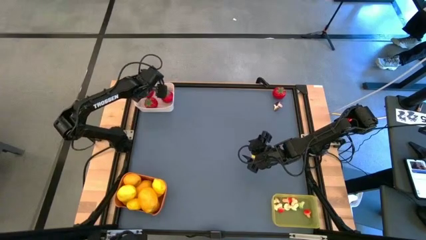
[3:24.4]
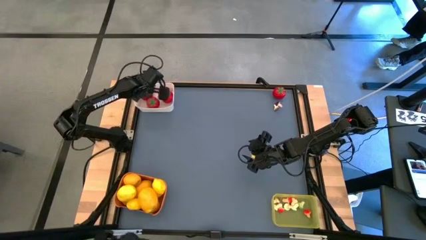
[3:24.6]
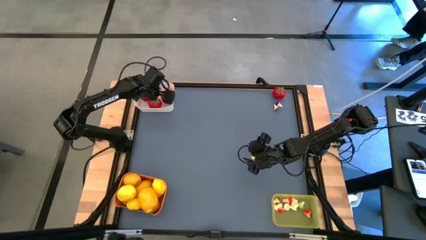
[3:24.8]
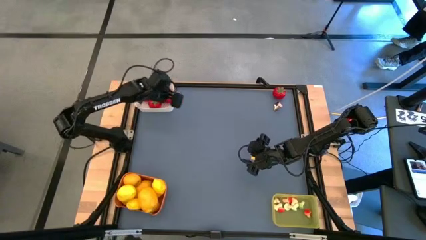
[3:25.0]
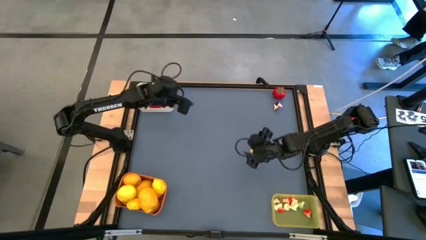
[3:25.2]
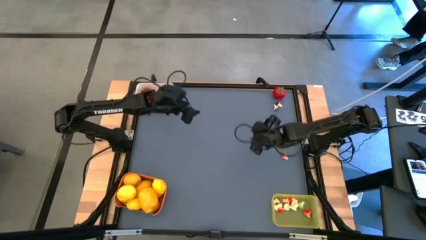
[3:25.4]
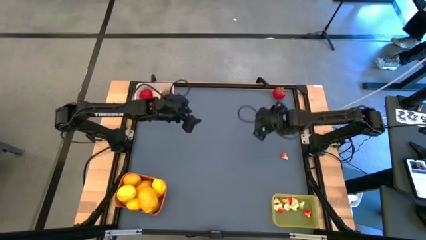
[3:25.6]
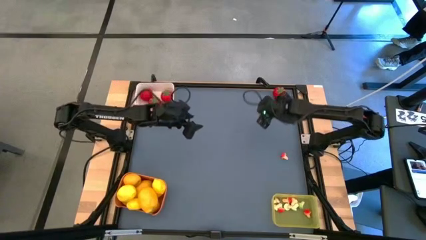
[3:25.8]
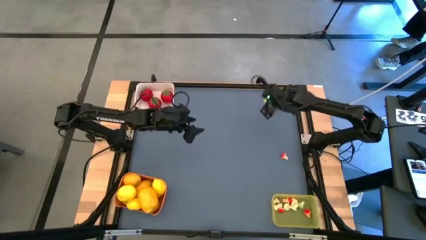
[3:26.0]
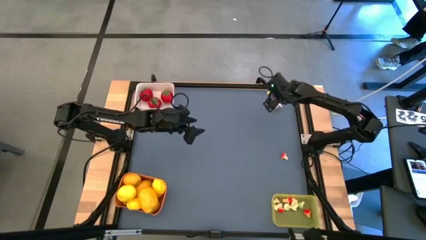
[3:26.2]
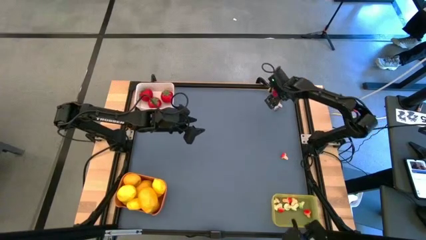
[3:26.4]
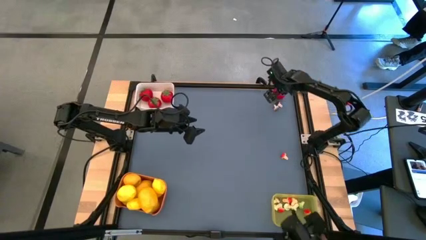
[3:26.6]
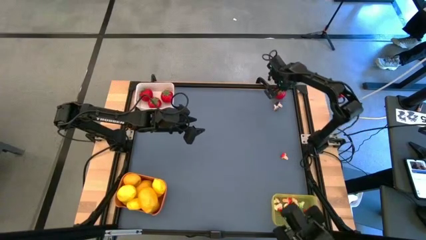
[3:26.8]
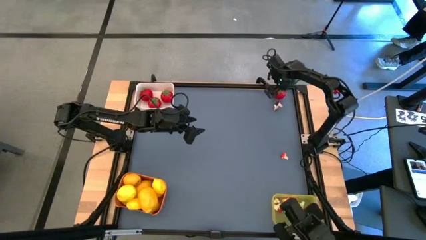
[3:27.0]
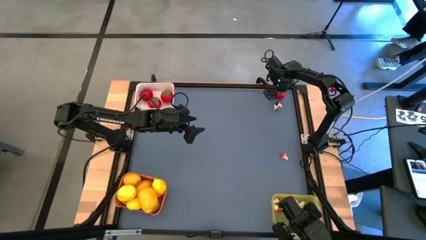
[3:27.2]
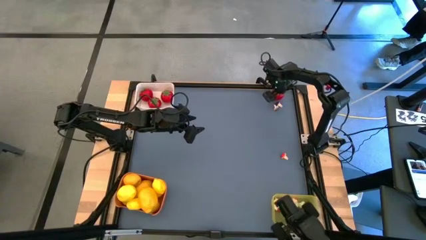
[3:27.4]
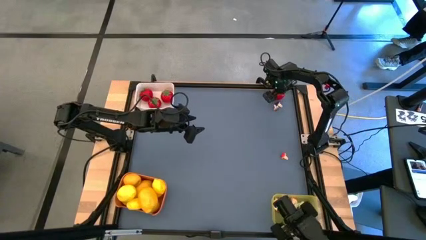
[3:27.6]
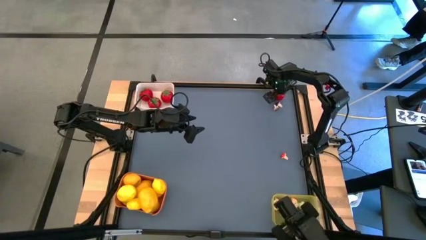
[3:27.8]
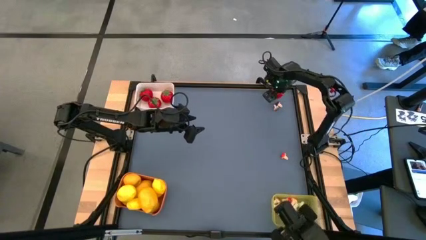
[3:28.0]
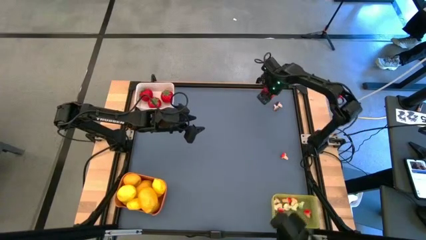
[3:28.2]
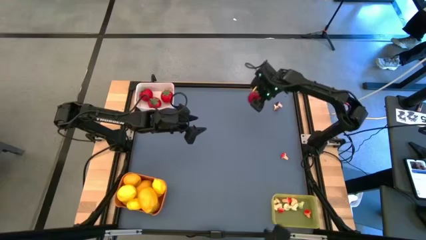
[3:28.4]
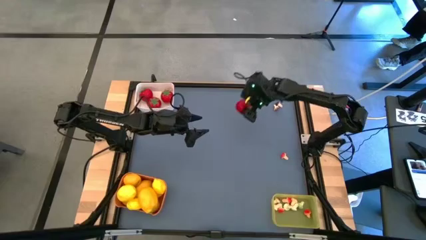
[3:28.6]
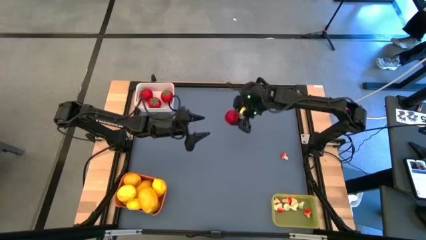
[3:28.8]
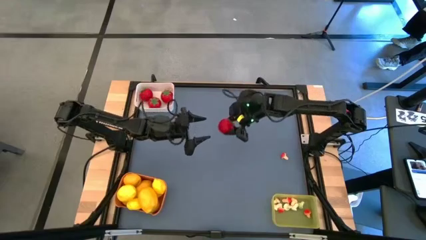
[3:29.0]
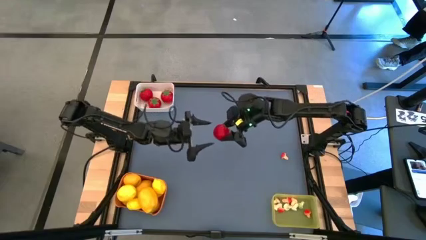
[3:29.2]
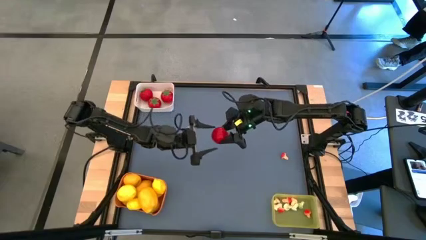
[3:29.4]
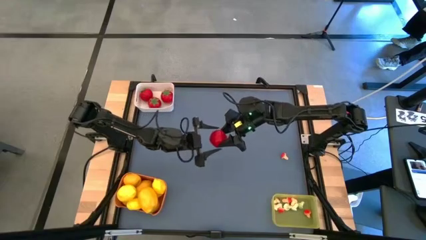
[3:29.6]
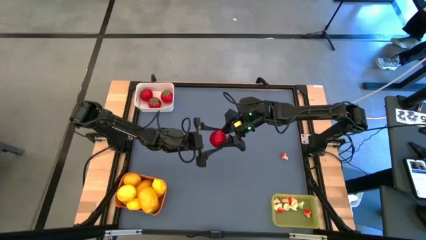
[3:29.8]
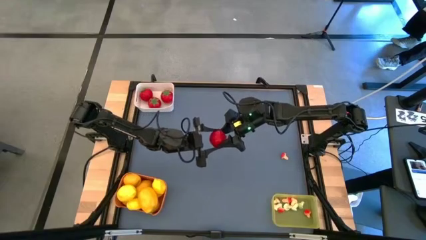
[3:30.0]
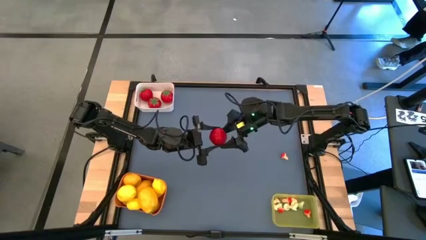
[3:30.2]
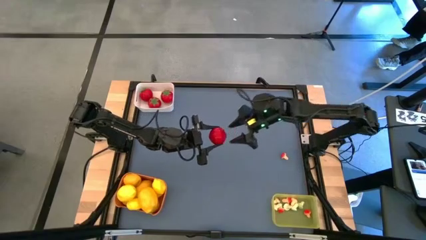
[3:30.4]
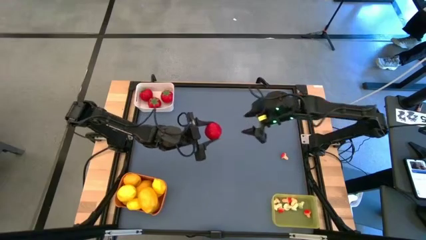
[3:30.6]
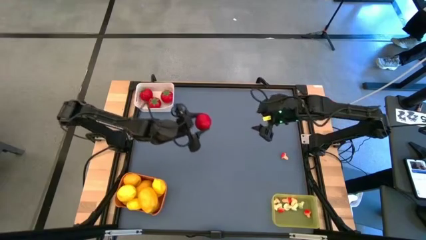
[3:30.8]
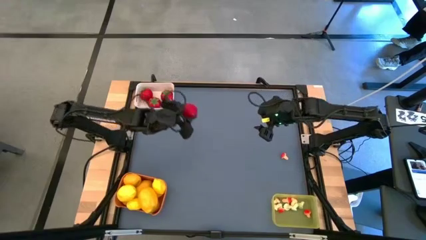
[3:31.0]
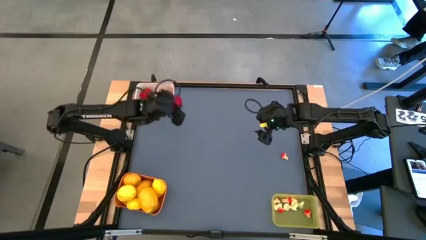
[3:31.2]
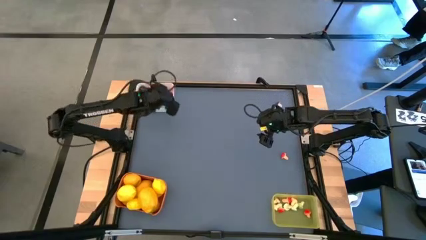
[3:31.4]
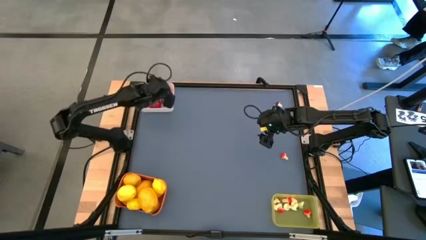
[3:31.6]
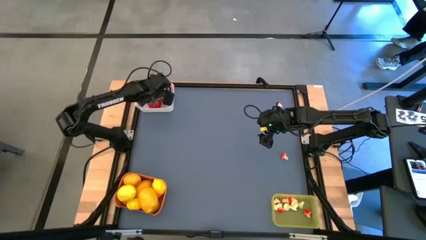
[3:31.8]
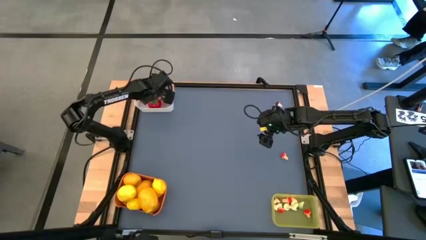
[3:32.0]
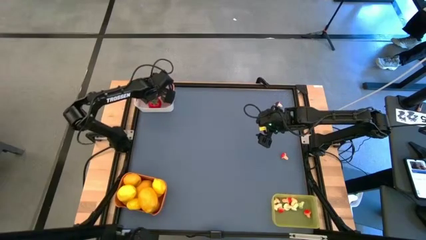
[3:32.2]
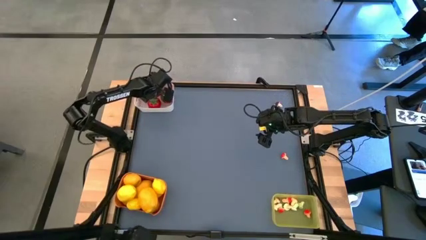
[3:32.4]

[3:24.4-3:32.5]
Task: Sort produce into baskets
Put the red tomato into the white bin

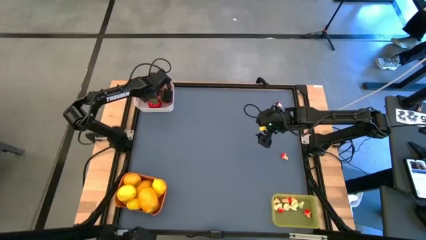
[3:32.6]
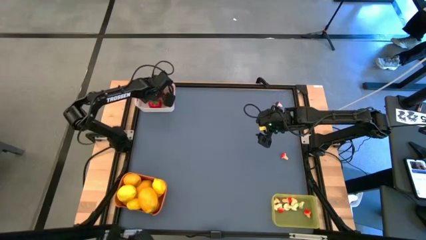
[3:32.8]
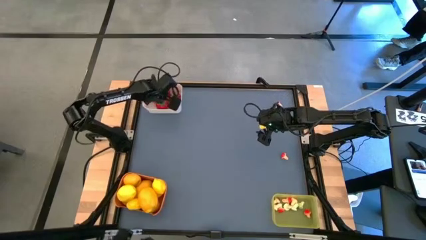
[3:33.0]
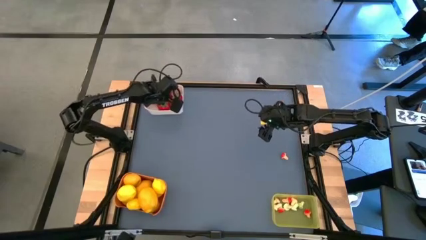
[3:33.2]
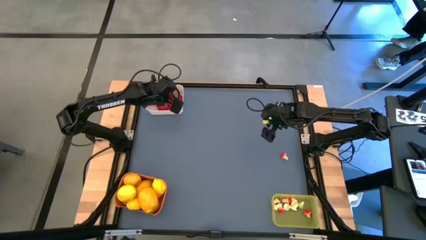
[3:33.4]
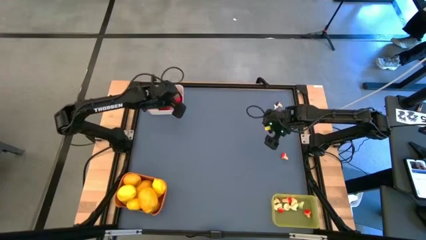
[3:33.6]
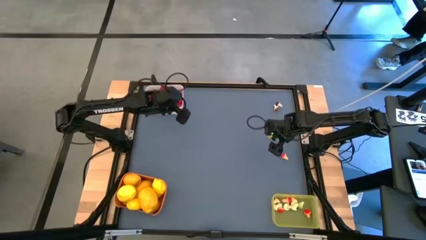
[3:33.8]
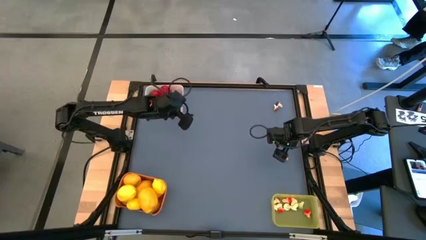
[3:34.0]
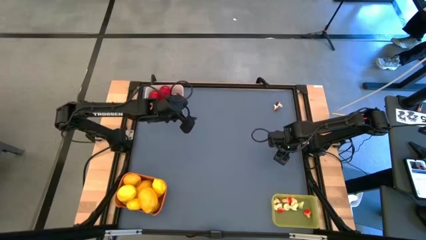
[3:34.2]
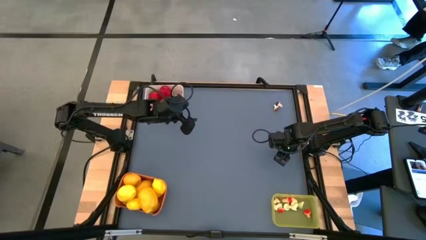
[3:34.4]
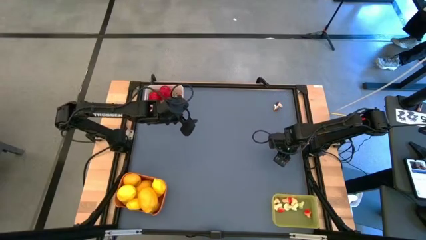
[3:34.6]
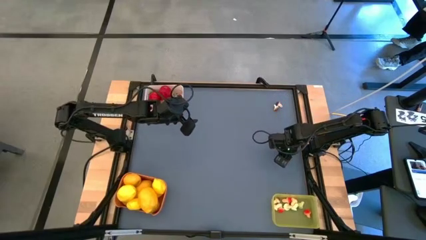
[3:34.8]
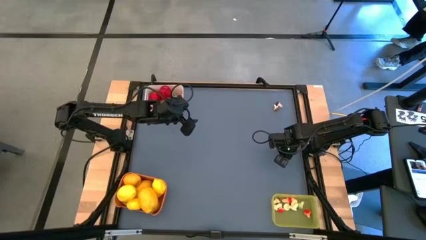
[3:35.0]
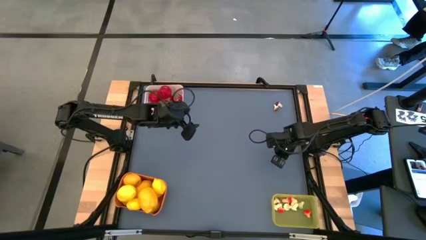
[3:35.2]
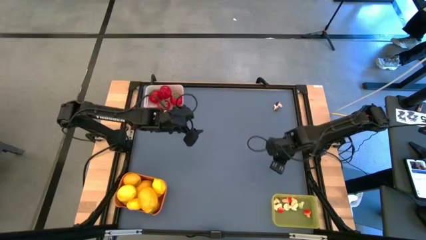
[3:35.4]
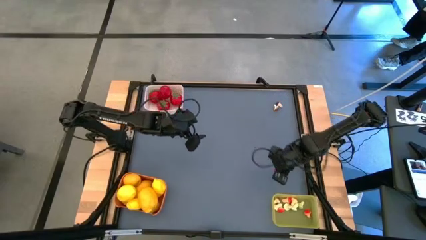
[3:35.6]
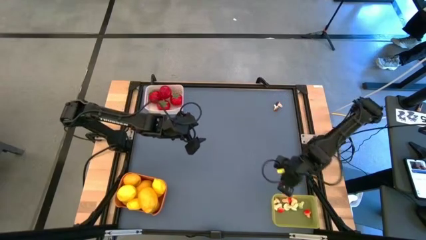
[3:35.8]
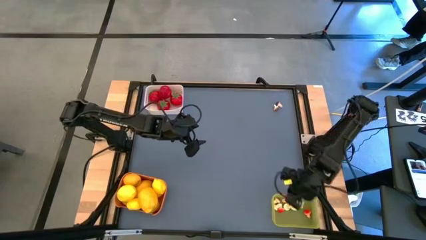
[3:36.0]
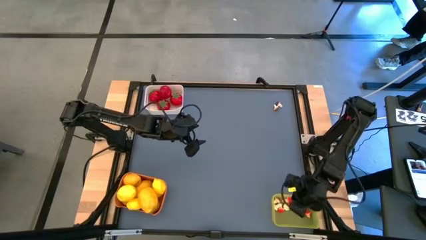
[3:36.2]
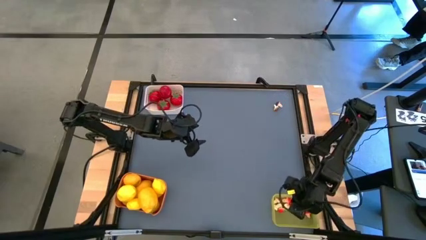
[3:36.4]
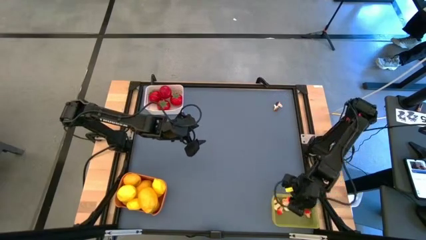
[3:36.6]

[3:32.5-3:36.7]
Put the red mushroom into the yellow bin

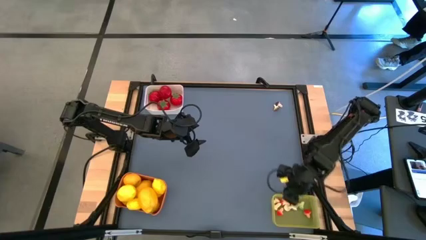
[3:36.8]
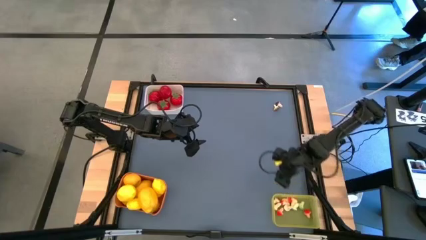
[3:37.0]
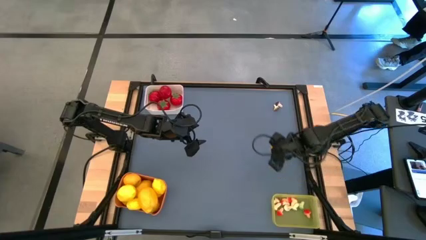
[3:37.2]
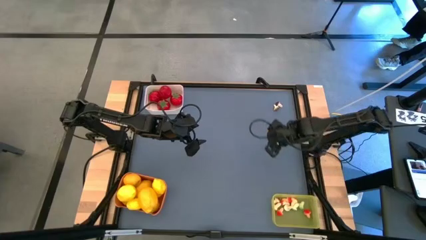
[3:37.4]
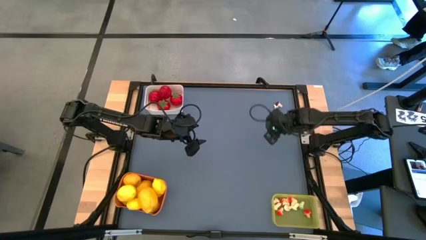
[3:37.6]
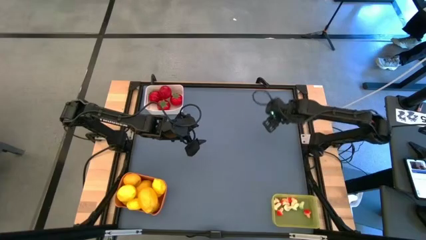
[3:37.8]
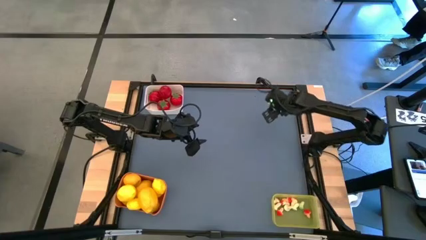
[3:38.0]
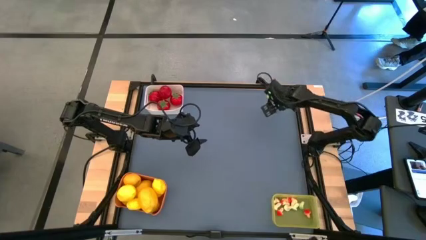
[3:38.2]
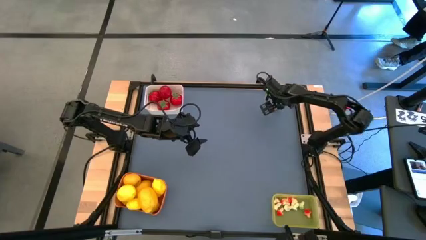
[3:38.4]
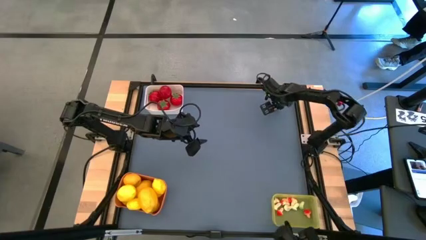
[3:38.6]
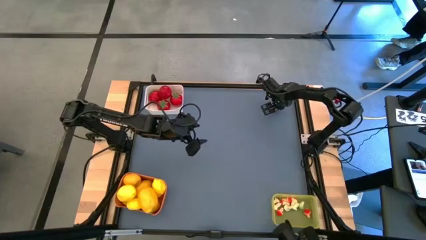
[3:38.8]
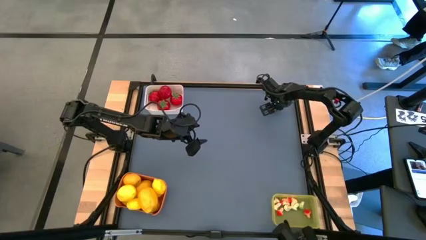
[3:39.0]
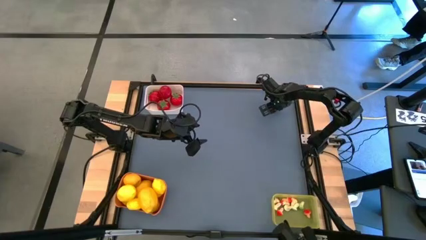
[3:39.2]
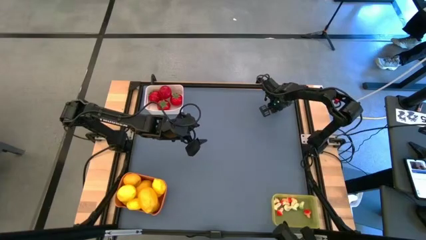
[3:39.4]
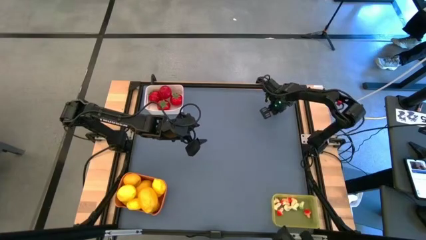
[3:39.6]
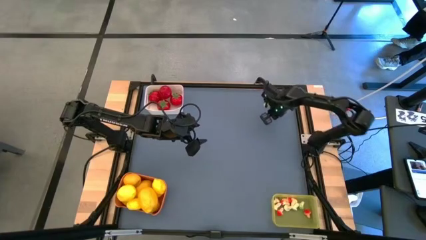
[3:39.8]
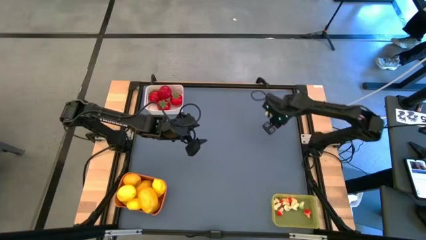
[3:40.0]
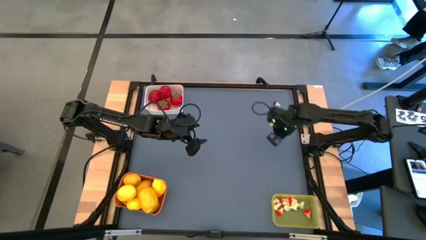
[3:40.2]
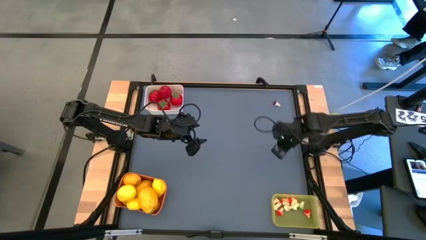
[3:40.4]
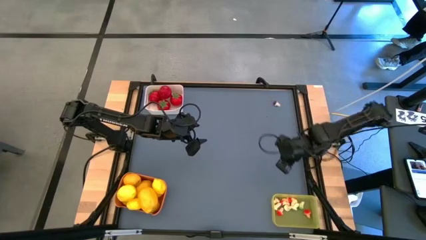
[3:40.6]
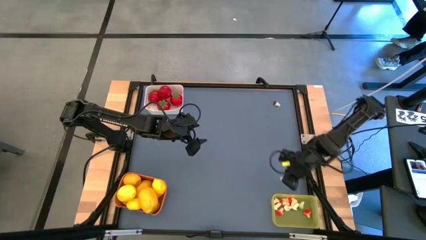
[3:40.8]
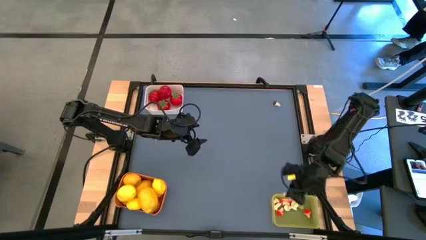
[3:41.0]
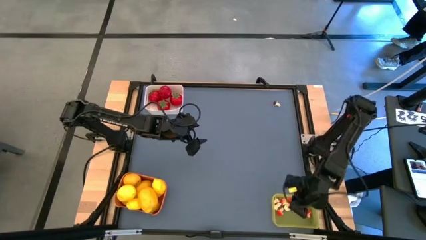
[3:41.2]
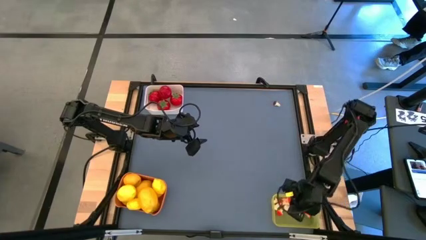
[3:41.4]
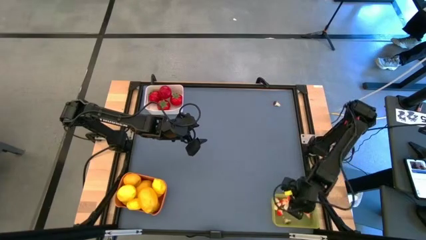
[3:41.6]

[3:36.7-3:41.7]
Put the brown mushroom into the yellow bin
